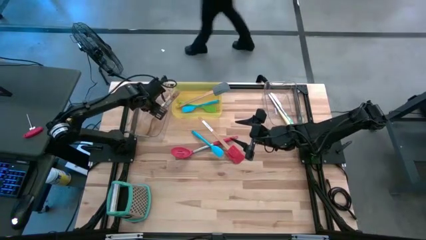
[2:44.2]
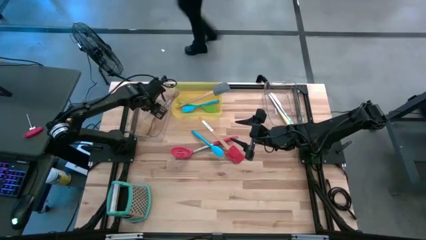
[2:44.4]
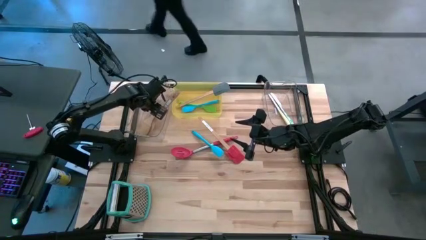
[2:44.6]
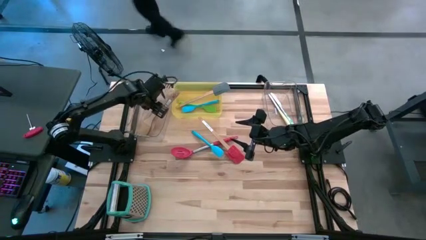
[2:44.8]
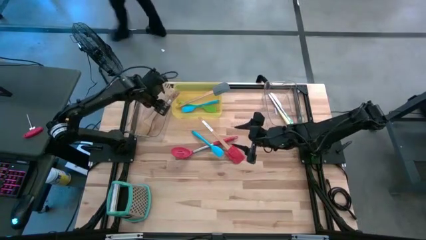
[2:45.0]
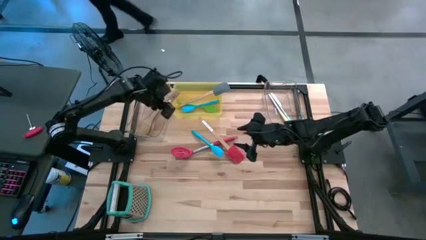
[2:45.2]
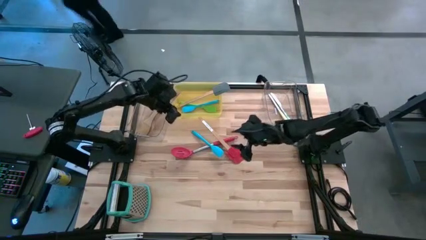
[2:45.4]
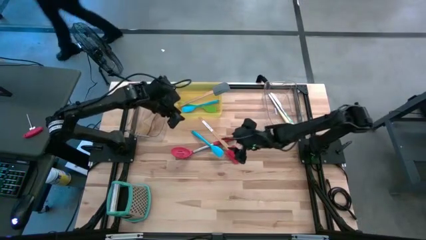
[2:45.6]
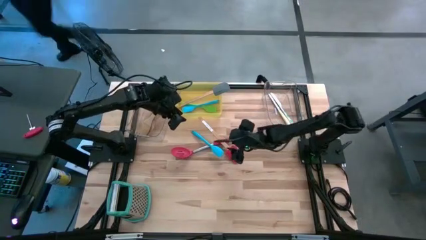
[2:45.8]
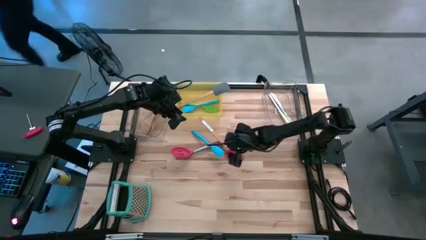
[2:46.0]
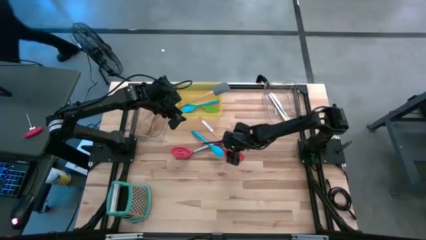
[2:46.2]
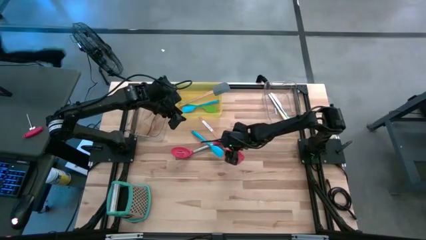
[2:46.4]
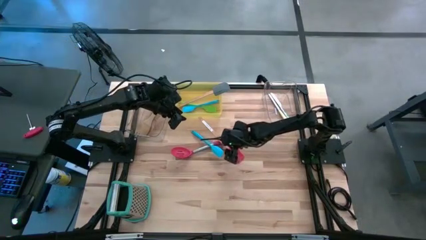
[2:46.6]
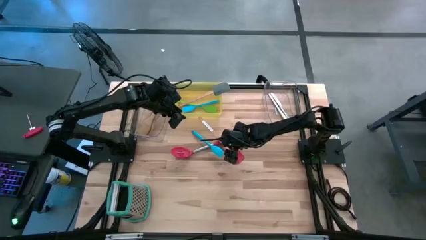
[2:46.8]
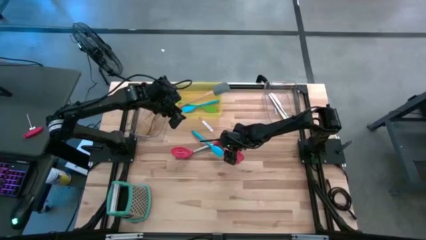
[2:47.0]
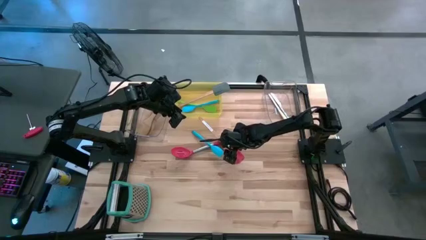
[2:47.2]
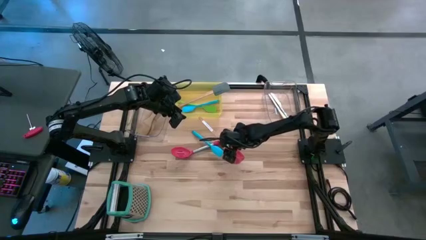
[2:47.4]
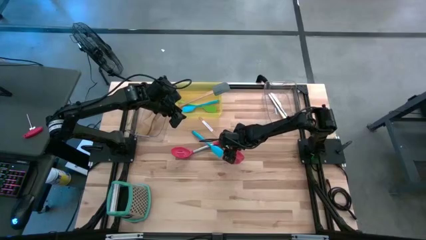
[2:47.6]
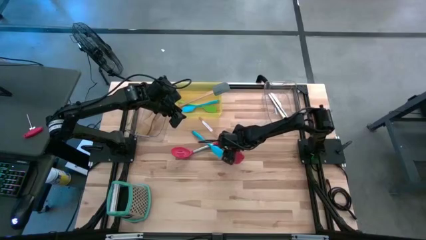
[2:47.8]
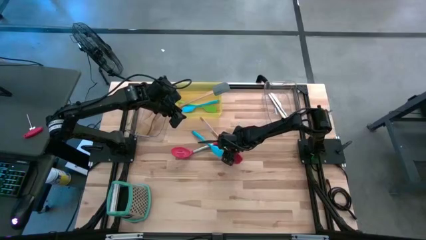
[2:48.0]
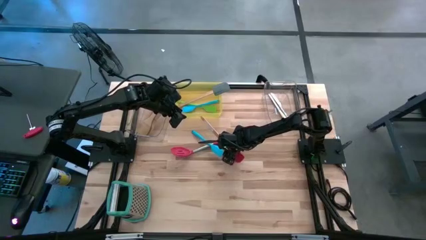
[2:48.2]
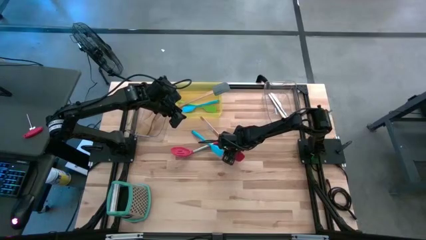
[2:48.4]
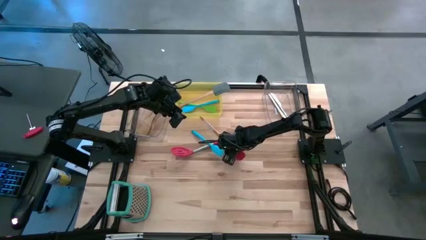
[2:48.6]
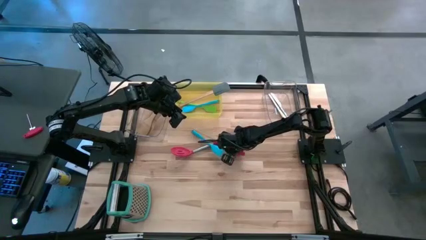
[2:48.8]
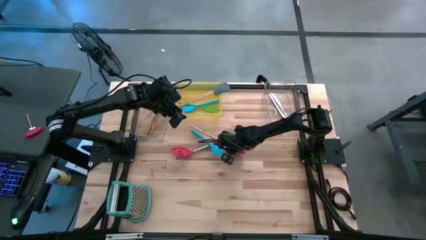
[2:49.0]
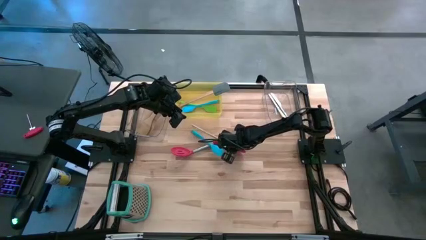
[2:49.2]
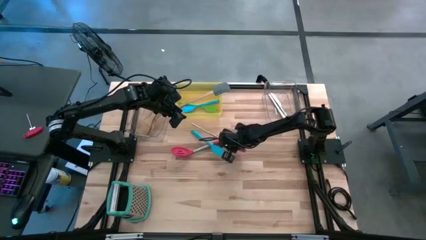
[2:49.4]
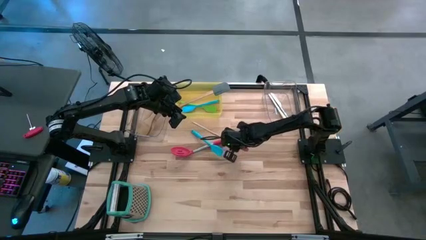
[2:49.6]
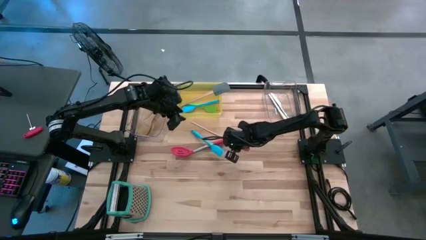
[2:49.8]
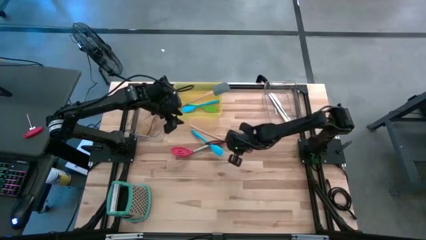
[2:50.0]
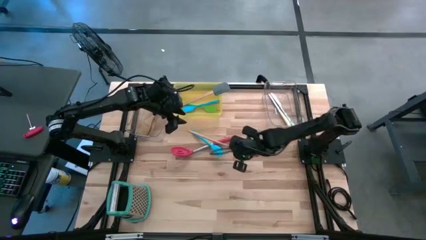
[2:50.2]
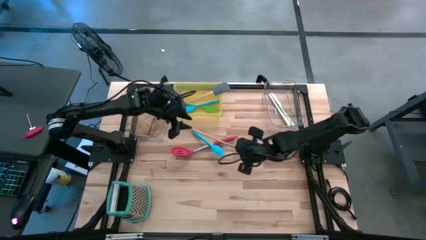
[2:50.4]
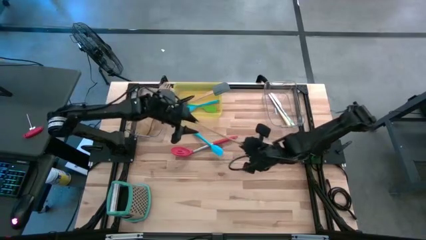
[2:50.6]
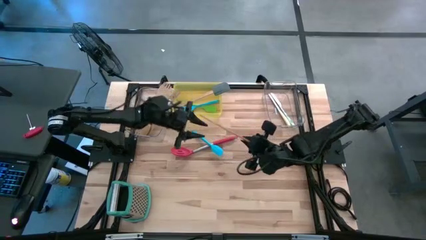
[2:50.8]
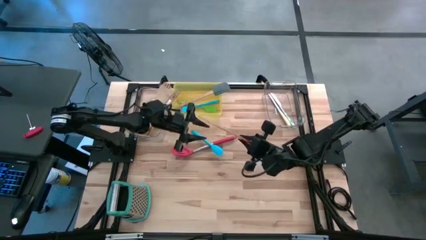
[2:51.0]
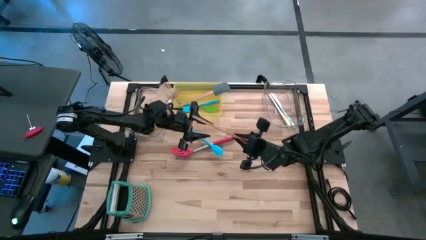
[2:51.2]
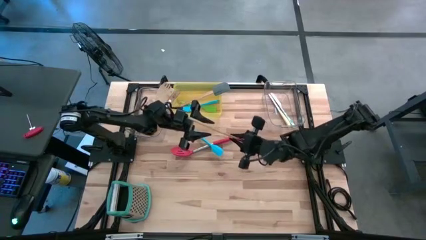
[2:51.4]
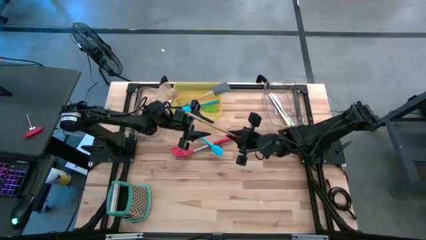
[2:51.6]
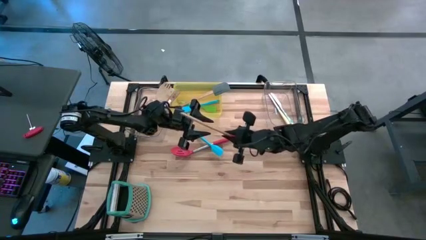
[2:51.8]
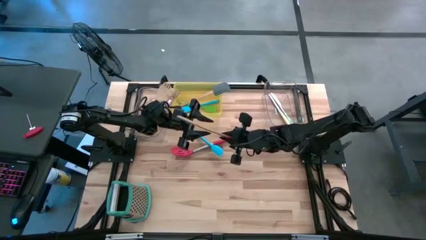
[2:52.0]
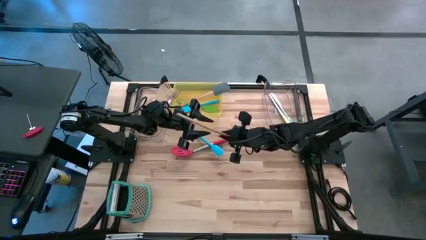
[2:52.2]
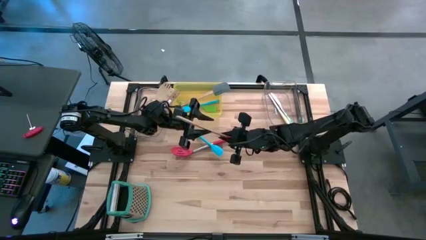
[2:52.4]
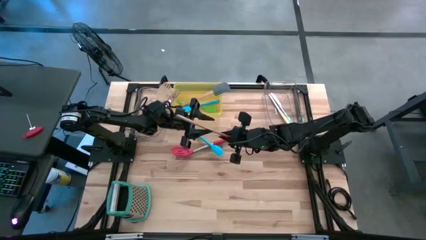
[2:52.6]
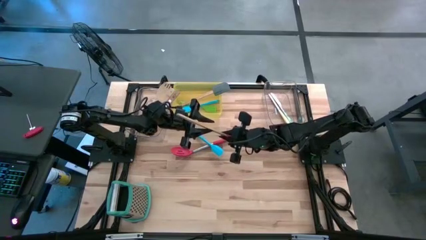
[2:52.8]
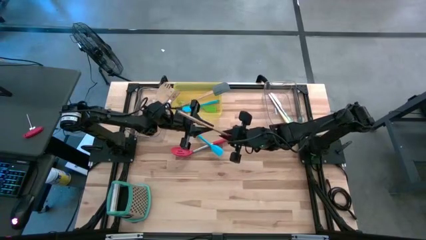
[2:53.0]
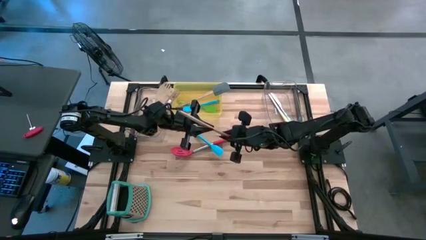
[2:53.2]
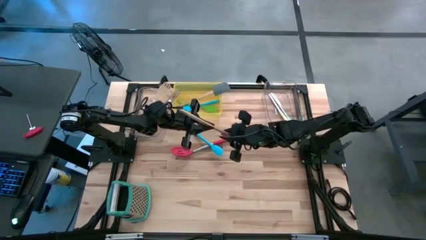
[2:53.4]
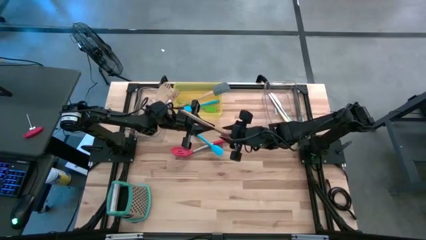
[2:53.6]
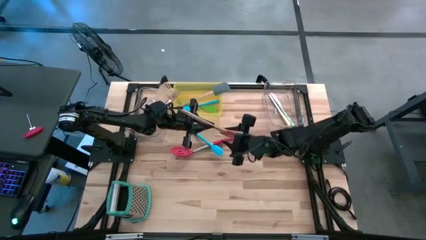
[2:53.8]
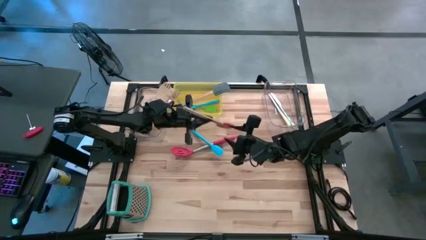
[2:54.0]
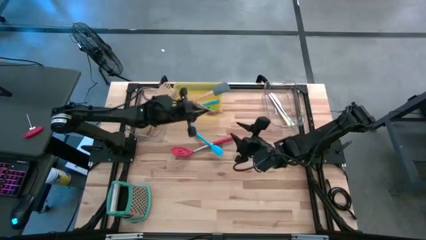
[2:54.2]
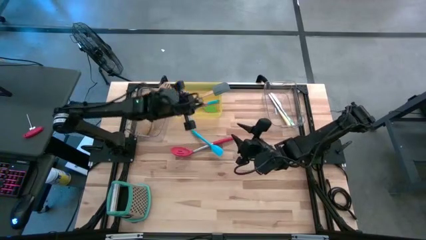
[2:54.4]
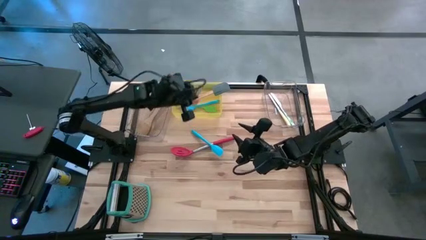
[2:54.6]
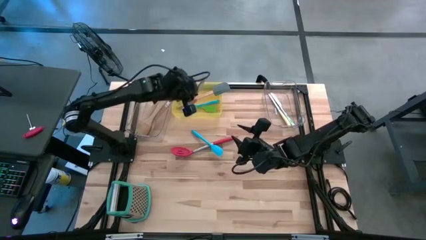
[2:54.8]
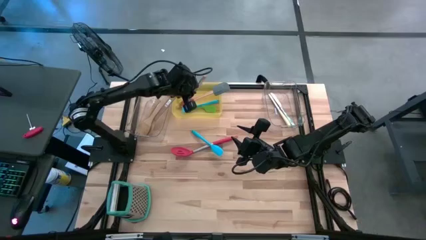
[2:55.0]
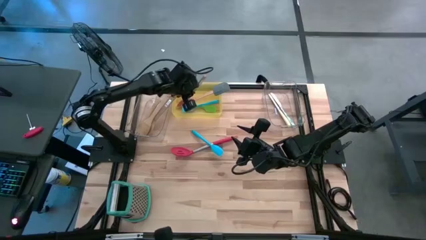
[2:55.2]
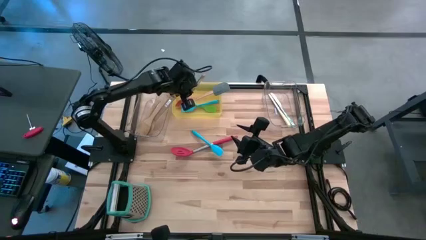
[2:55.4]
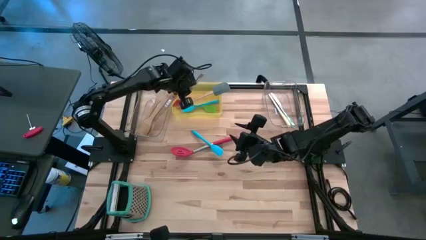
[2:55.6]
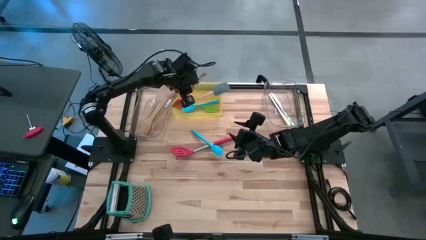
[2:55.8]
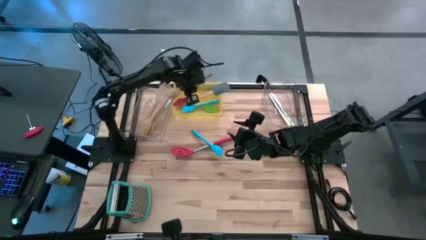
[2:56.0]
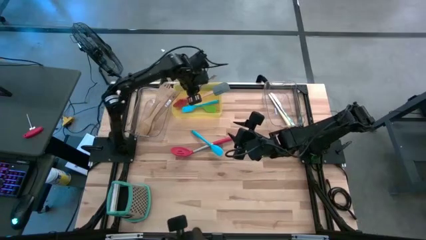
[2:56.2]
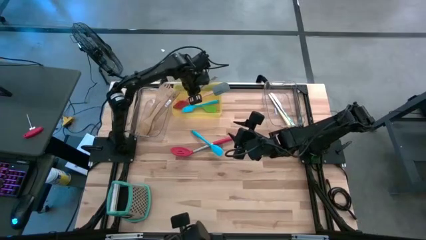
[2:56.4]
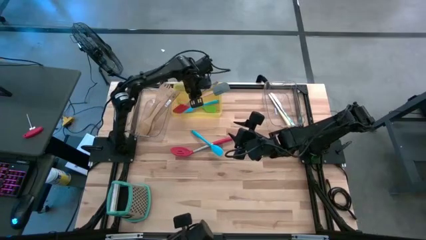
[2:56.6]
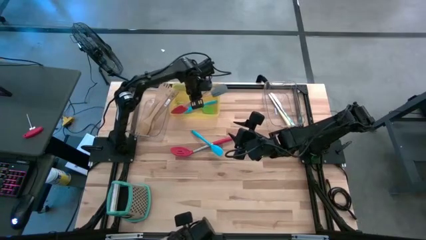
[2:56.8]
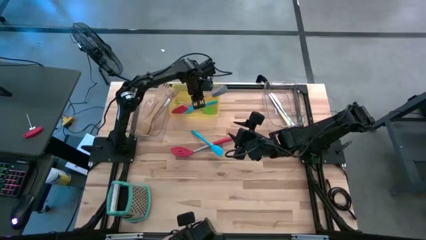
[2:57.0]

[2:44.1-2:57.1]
Task: Pick & Place Kitchen Items
Put the red spatula into the yellow bin

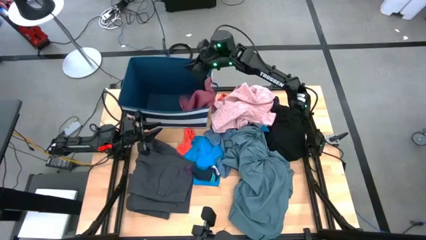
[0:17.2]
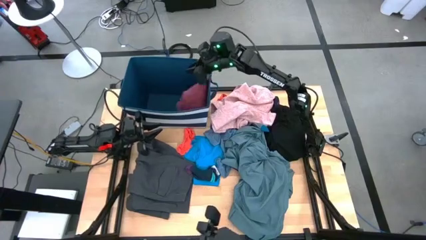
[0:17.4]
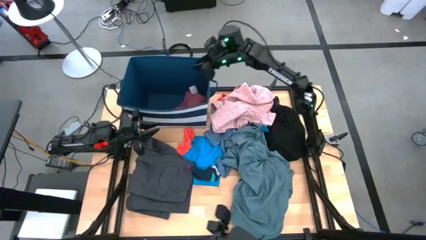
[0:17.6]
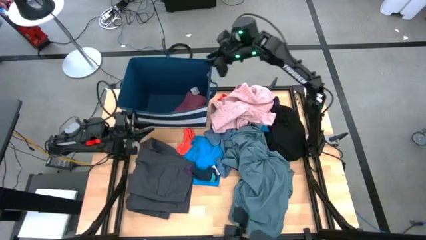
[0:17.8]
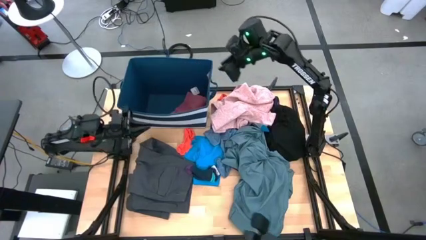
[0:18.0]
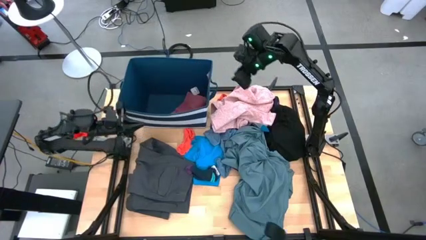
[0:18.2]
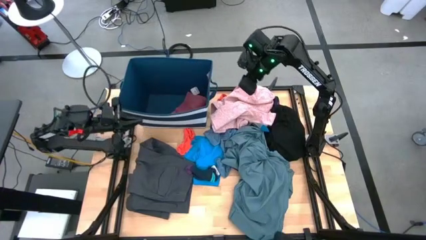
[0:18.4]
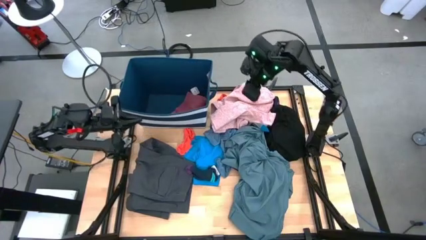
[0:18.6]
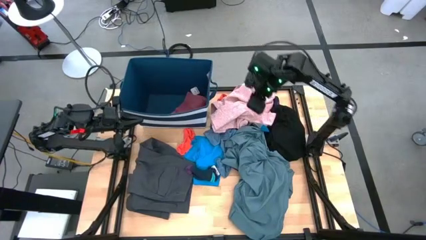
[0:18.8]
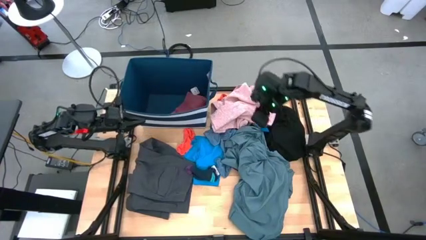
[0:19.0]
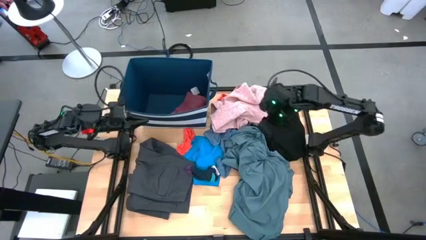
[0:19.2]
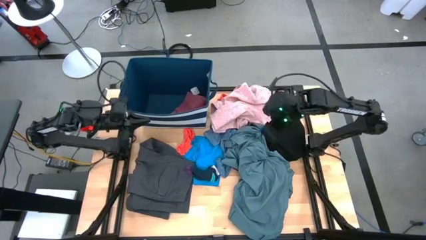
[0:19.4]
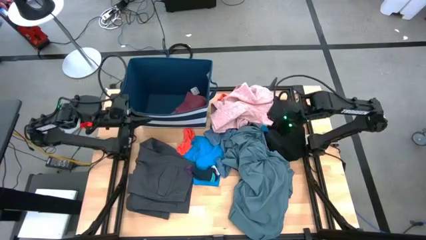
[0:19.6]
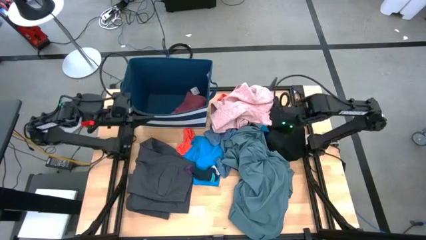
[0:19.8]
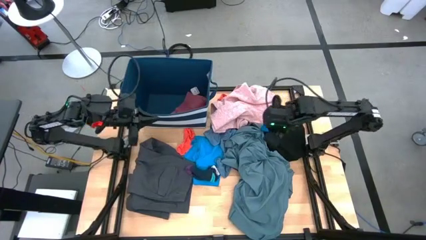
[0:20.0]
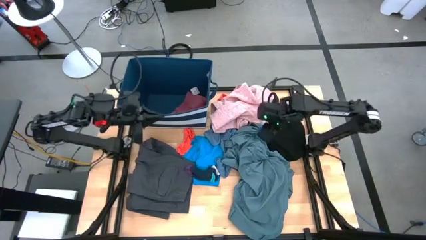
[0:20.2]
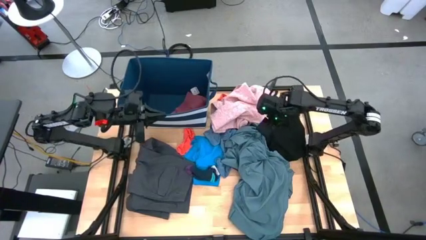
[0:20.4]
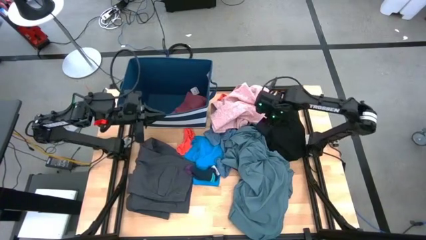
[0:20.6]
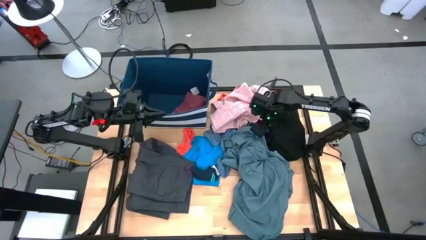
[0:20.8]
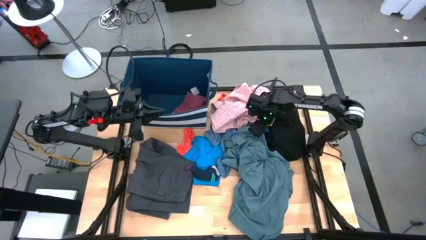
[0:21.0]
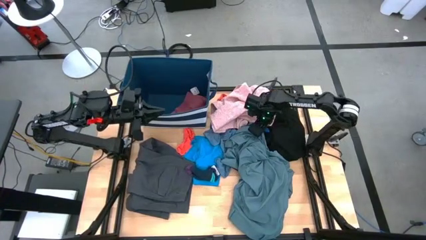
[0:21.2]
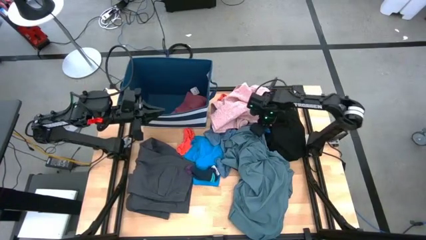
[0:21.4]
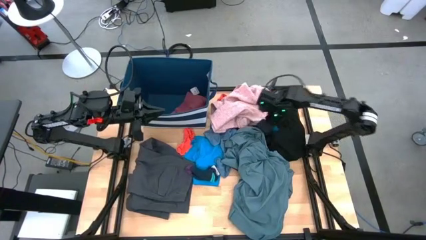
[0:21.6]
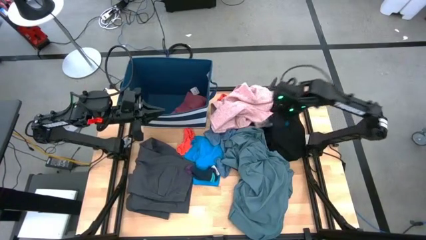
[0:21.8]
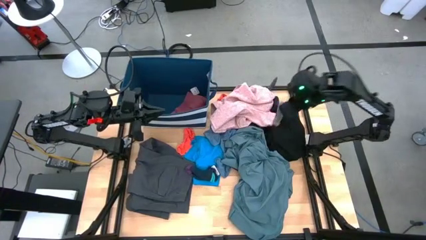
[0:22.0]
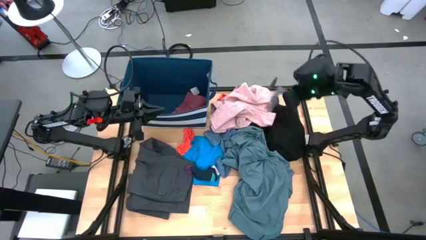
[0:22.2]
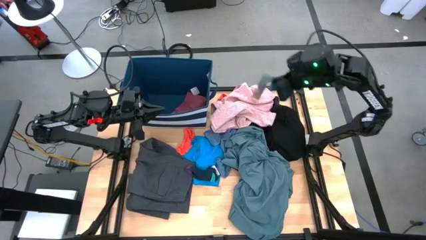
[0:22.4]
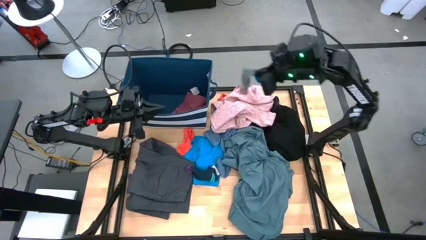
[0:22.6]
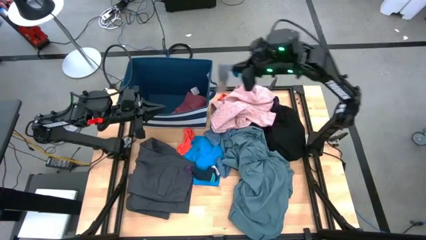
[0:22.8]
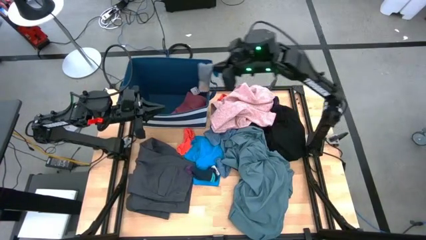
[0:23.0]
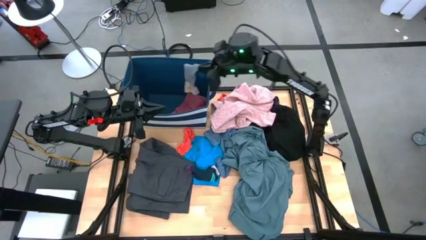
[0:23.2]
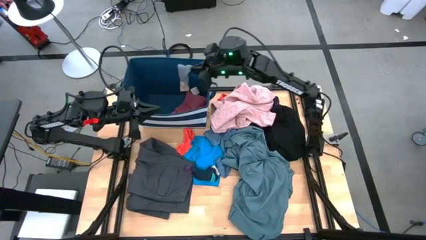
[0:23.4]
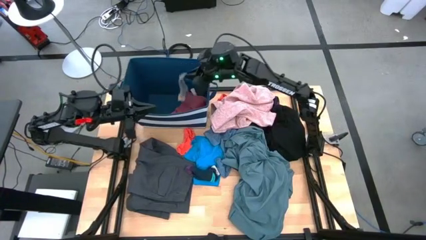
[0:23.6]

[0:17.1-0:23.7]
Task: Sort clothes
Put the gray sock into the blue laundry bin
